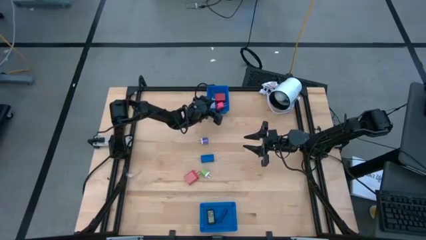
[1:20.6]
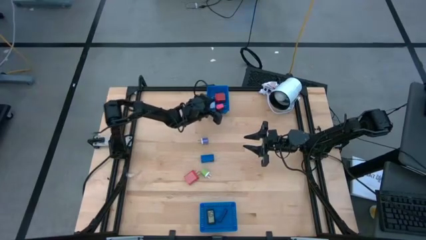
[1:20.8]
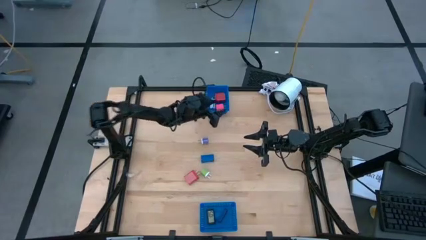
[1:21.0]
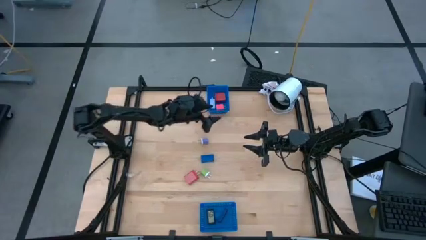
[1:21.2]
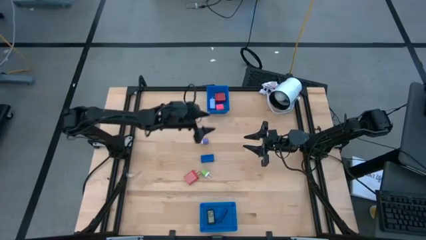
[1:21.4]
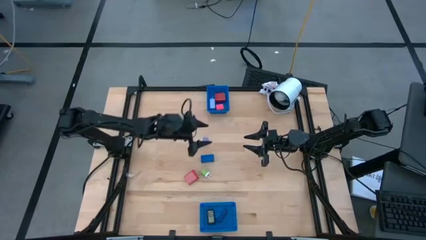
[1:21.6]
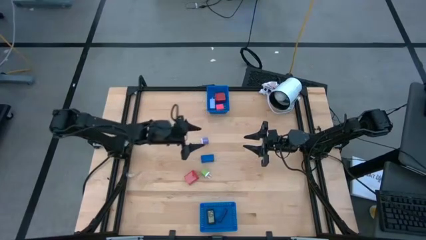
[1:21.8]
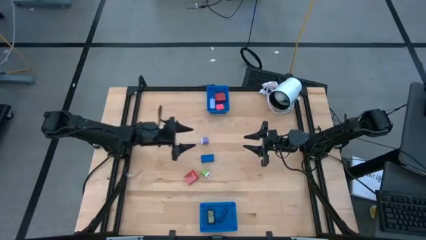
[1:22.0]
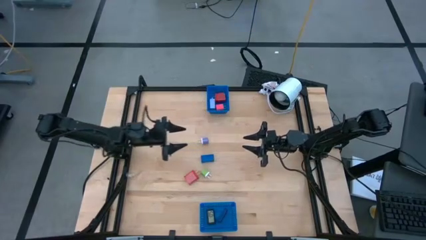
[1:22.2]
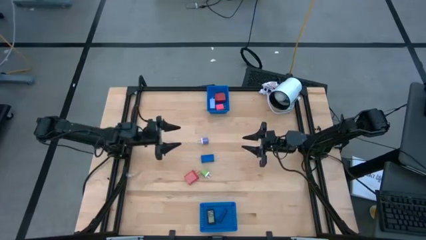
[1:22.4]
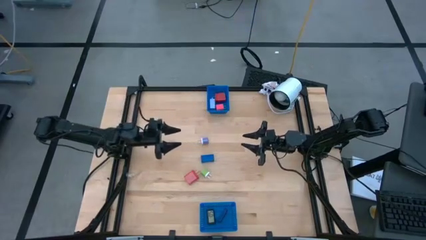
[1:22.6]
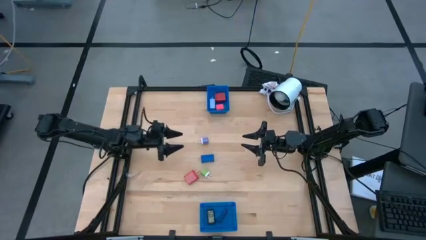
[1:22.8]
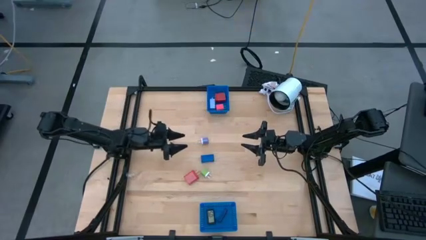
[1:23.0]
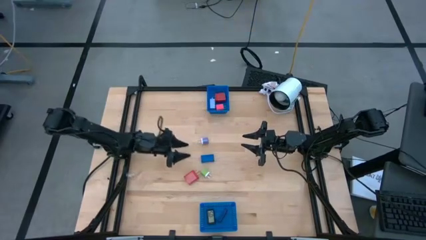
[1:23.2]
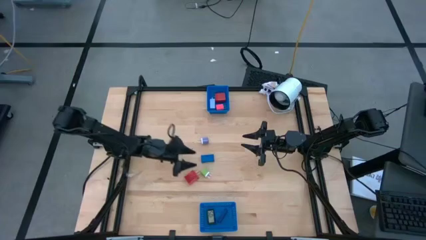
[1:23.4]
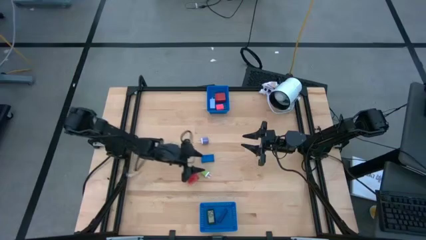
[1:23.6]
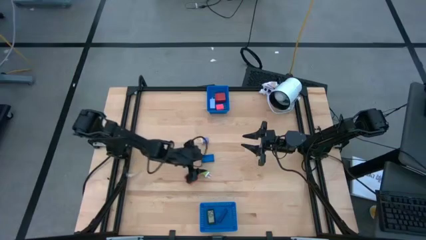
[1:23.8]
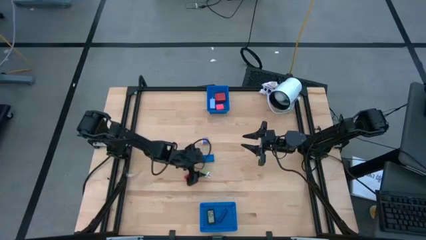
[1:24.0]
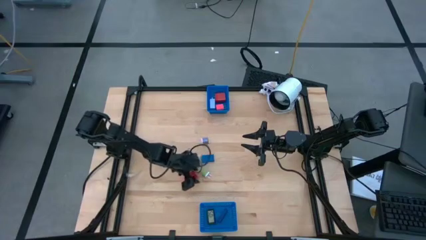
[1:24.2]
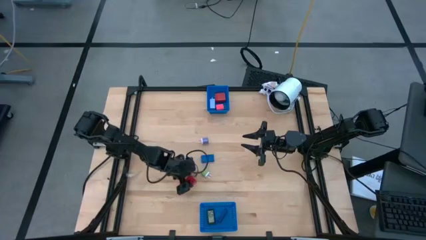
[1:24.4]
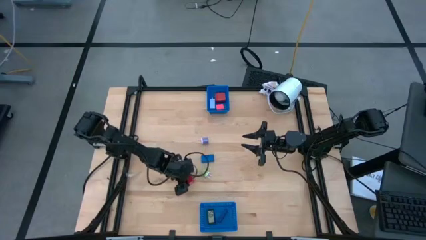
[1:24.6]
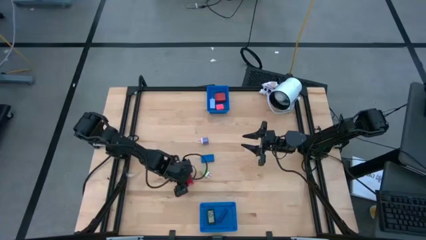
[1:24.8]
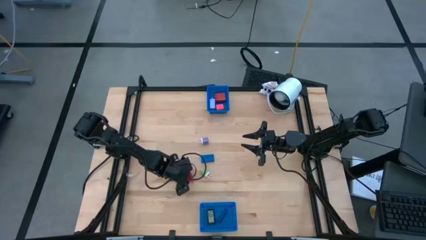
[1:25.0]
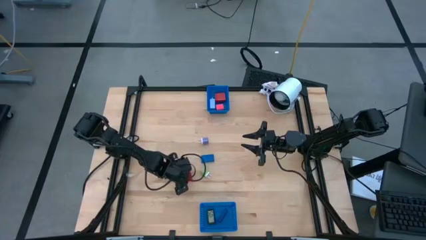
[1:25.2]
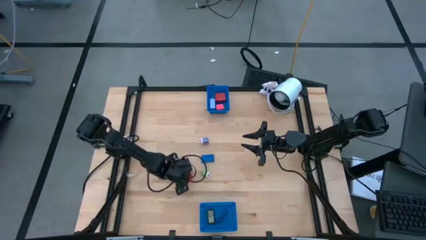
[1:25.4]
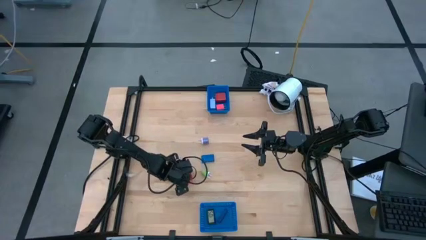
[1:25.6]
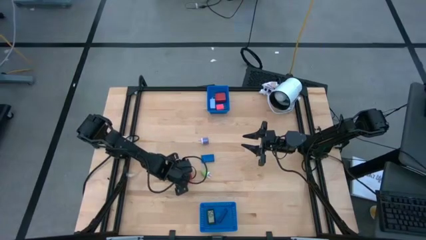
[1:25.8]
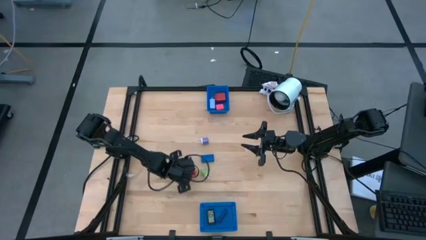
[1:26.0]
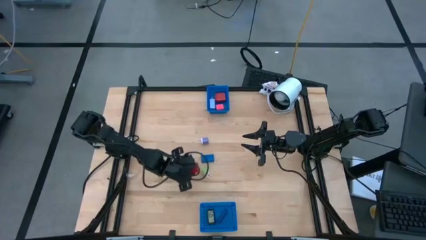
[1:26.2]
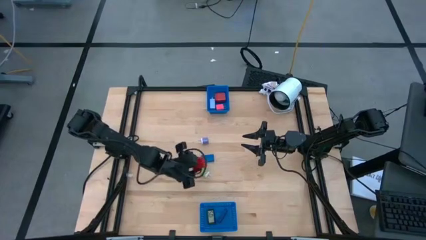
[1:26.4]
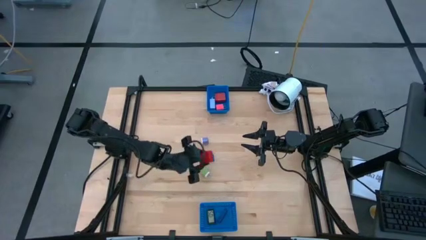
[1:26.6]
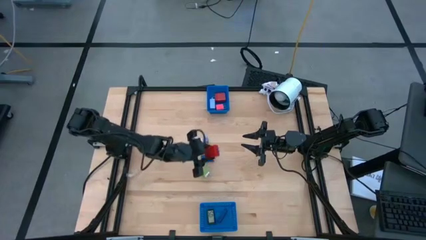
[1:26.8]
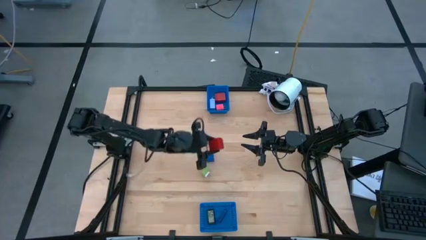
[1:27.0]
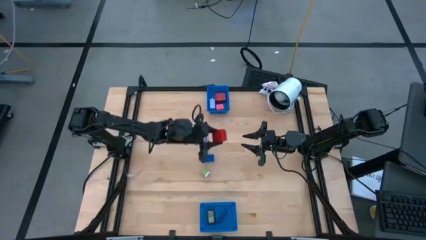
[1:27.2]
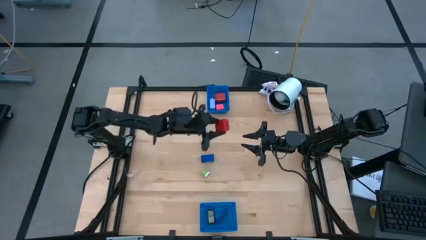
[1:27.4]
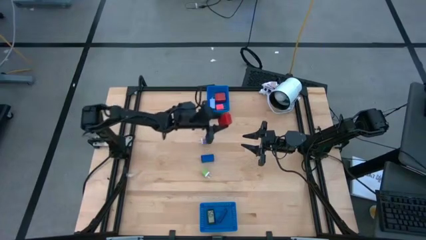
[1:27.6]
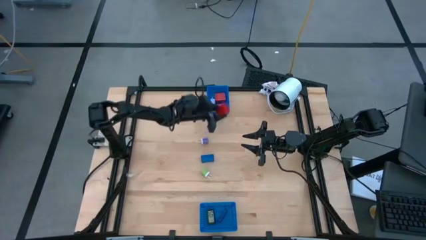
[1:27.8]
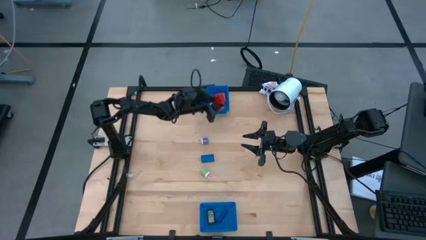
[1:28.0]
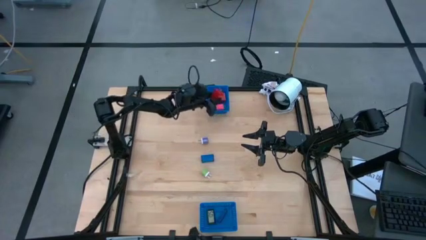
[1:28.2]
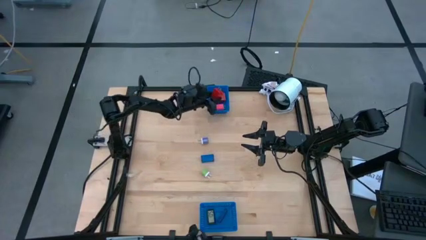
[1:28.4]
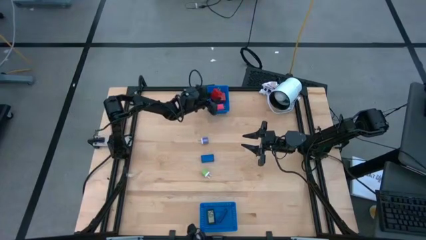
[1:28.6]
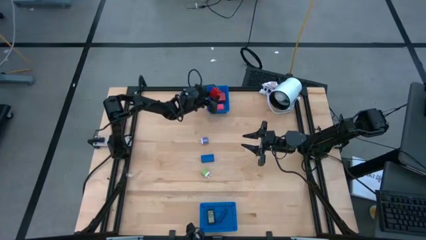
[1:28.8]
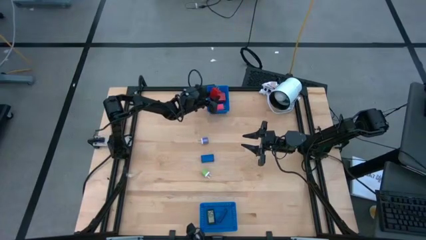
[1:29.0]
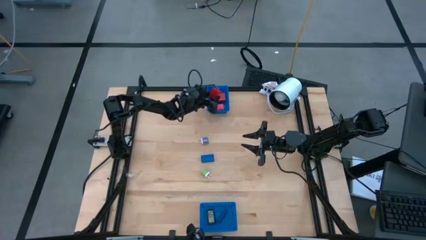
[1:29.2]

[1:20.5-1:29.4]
Task: Pick & Place Office items
Put the red charger adapter into the top blue bin
